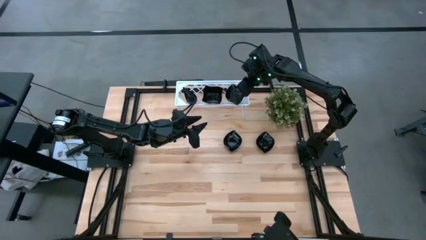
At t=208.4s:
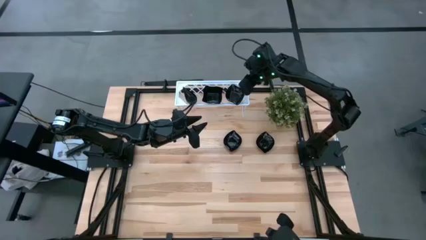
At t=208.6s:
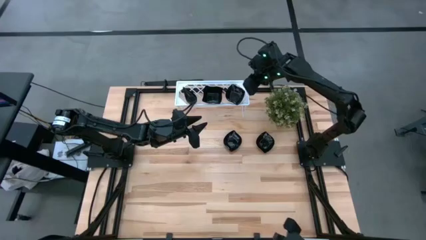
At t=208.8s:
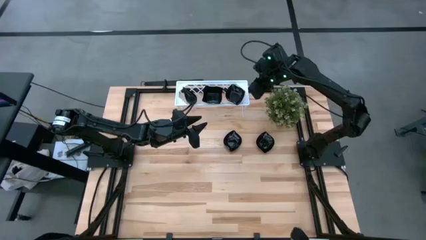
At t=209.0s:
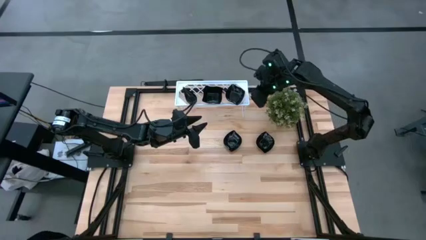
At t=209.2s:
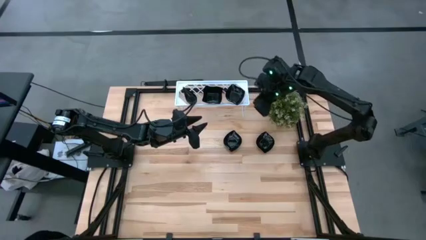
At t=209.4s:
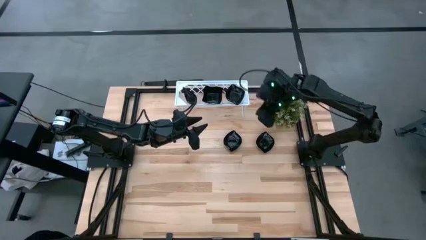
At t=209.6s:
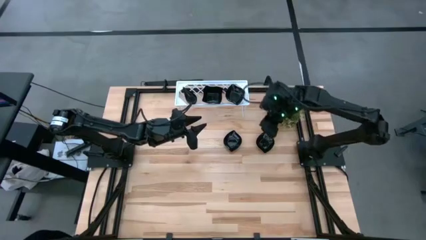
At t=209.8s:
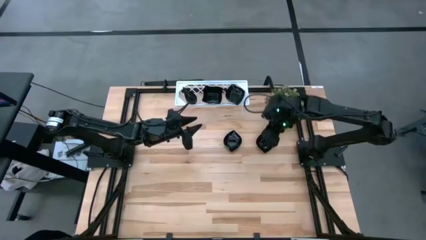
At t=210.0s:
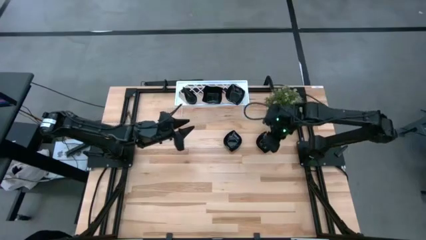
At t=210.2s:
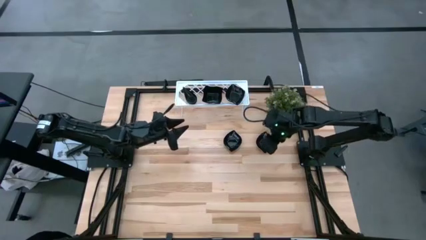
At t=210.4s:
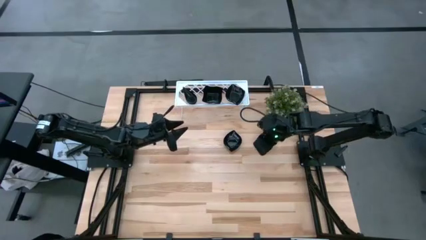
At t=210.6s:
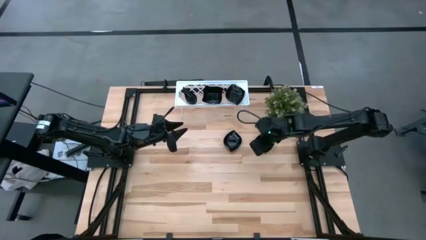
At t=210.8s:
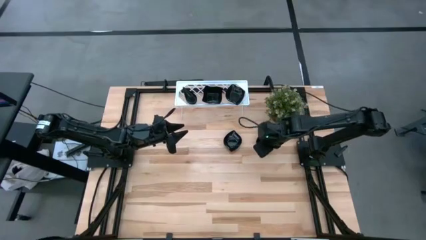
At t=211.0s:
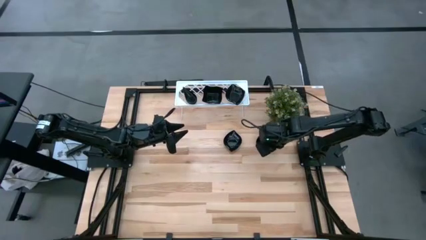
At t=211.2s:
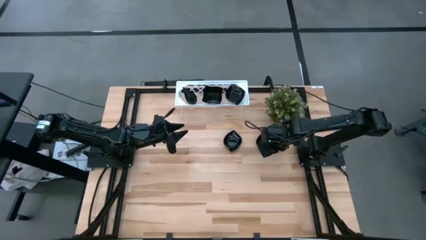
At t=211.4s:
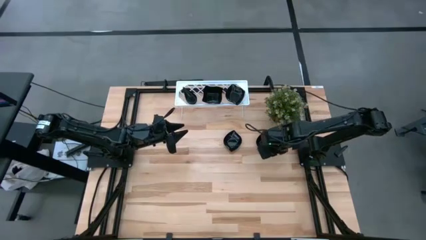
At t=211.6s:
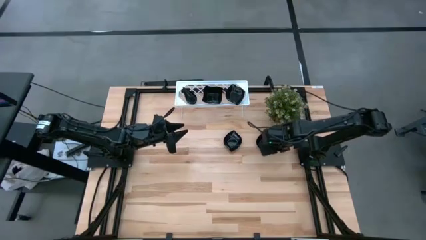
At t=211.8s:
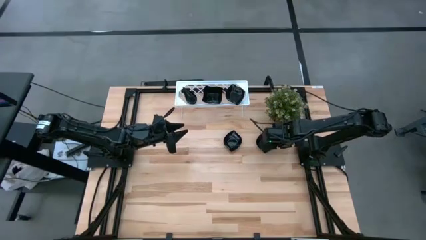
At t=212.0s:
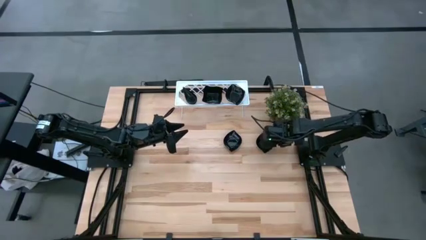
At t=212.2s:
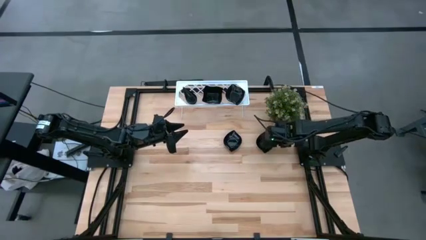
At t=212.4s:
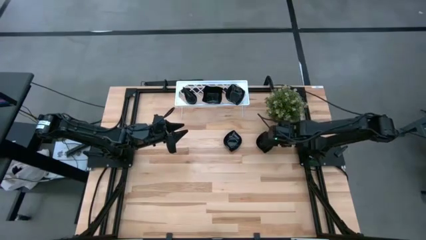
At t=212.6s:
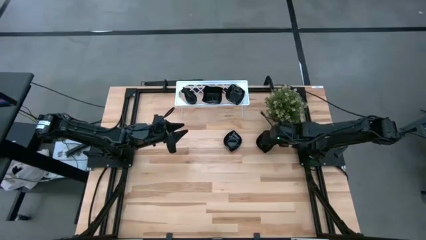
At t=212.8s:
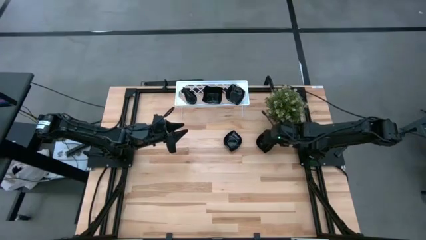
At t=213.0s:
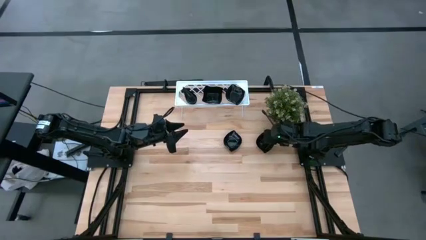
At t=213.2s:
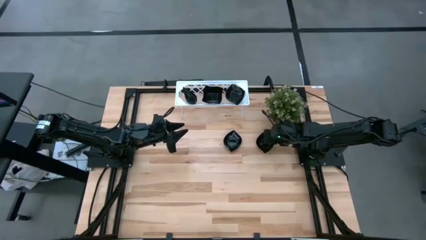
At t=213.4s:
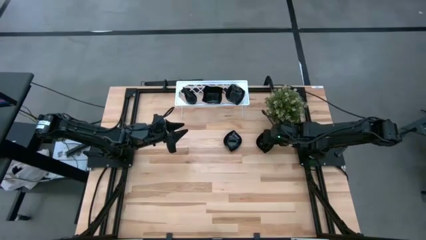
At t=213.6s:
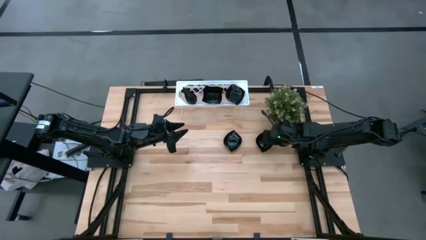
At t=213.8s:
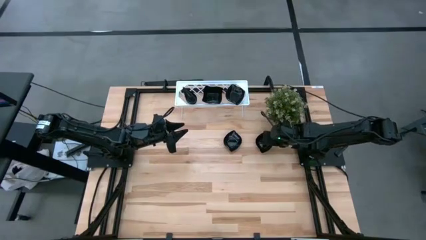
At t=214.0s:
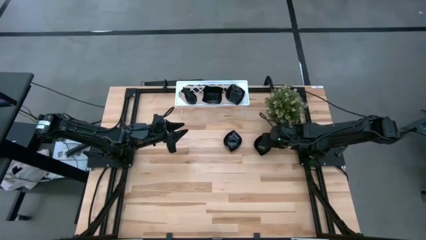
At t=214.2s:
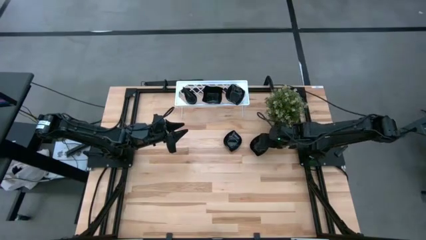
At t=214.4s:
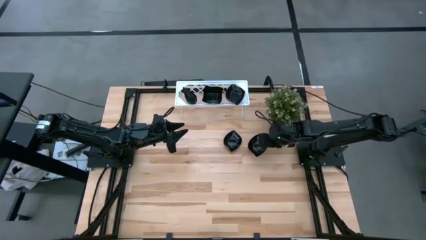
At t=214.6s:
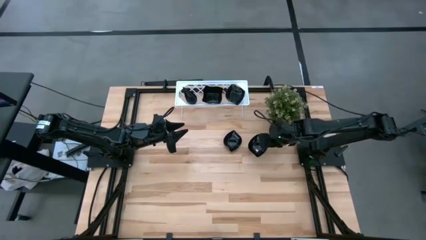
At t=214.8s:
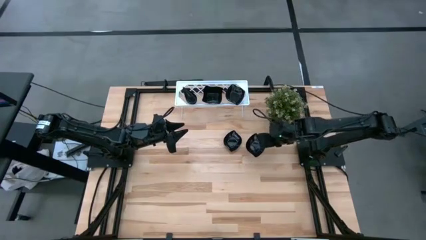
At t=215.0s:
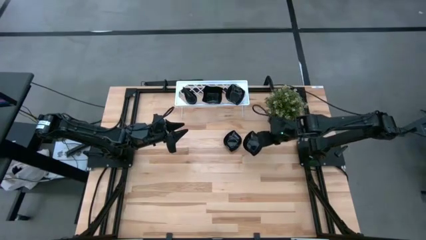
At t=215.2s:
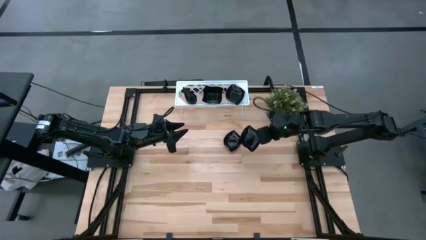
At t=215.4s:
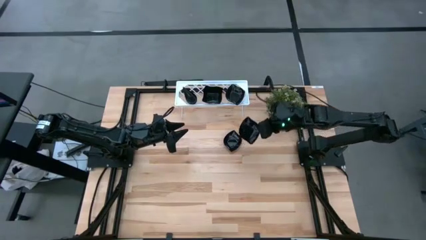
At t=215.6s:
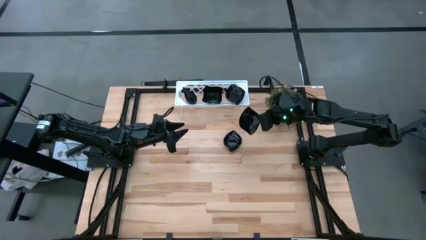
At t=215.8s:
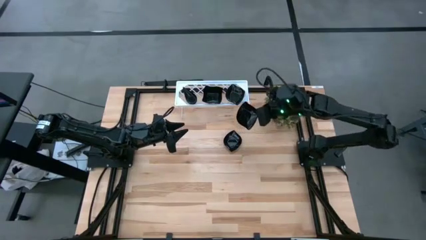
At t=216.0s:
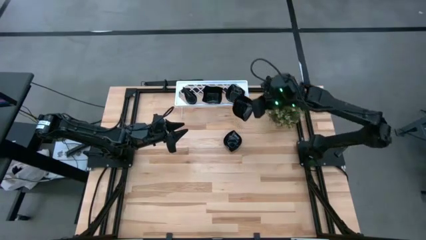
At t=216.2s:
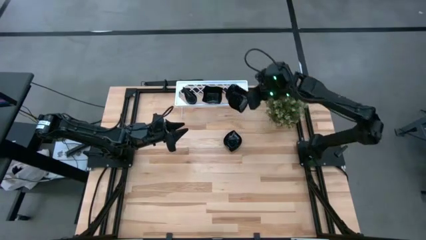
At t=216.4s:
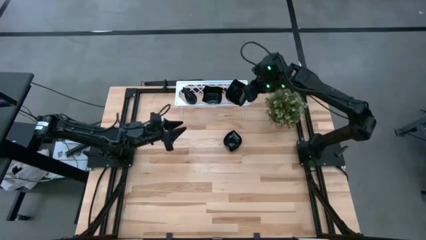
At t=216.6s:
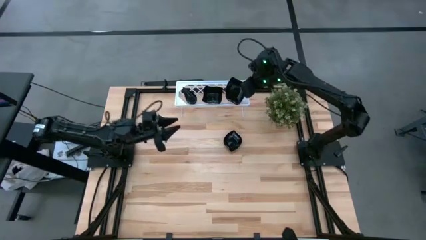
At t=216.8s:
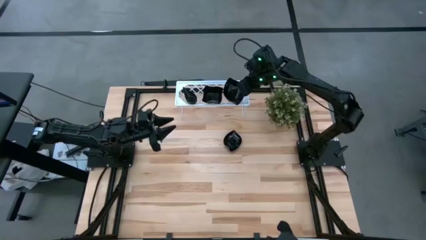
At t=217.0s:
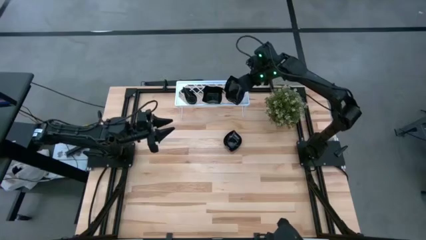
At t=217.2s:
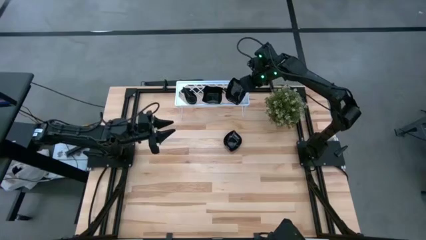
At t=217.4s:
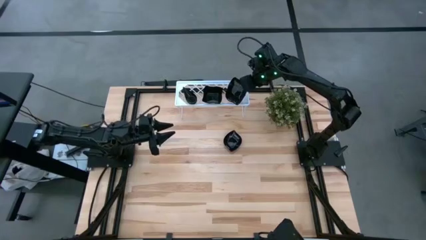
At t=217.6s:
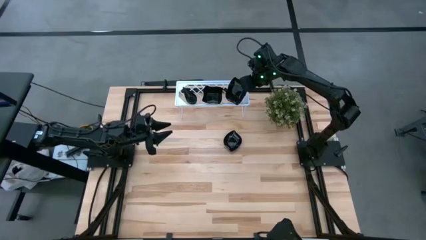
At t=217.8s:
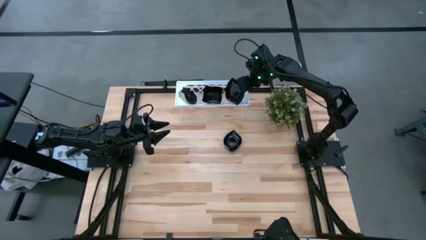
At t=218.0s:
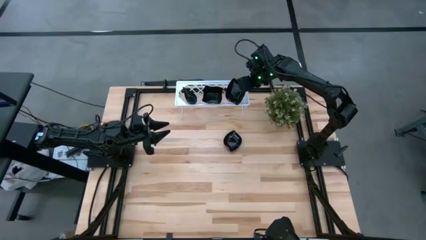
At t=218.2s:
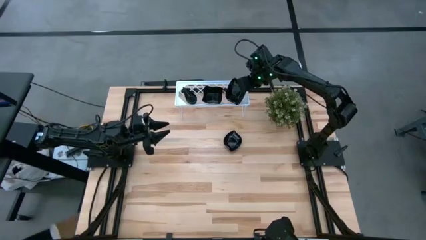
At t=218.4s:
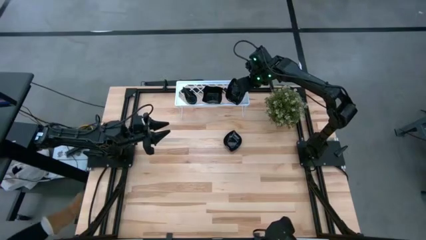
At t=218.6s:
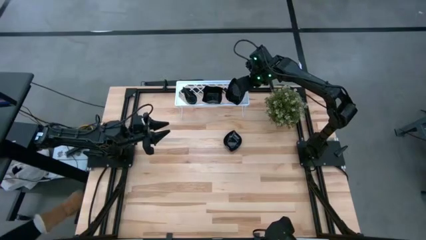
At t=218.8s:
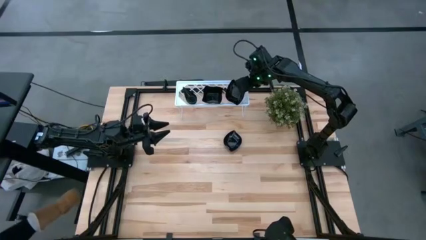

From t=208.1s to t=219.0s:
Task: Pick & Place Mini shaped plates
Stack the right leaf shaped plate on top of the leaf shaped plates on the shelf

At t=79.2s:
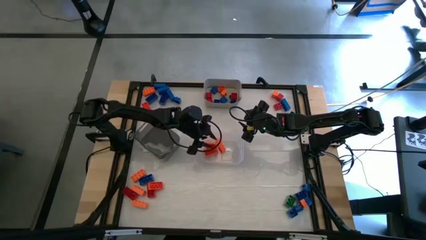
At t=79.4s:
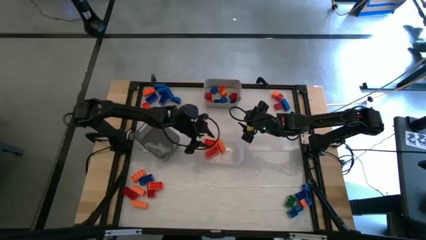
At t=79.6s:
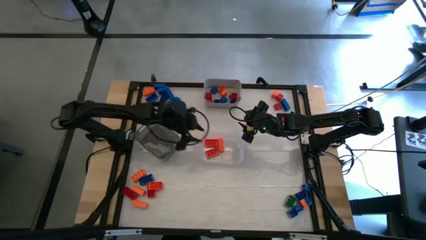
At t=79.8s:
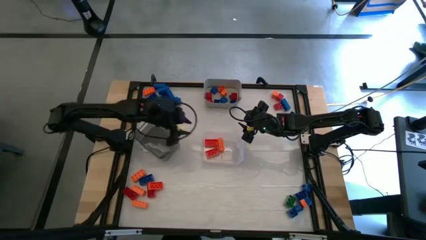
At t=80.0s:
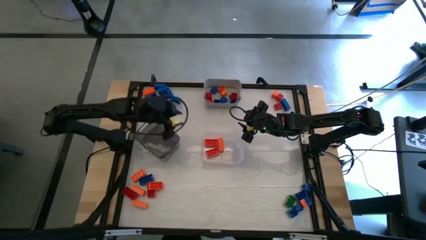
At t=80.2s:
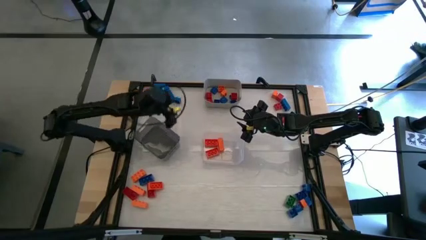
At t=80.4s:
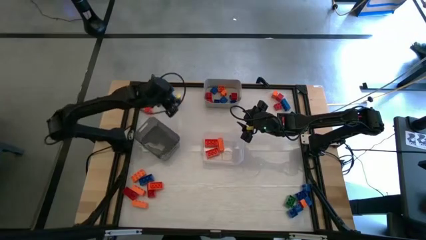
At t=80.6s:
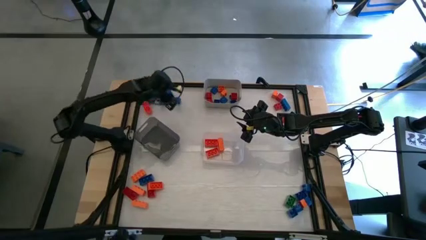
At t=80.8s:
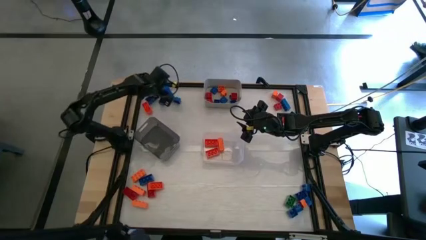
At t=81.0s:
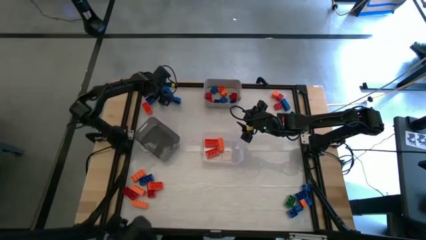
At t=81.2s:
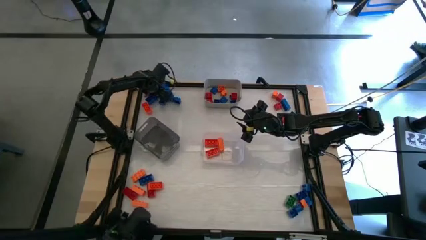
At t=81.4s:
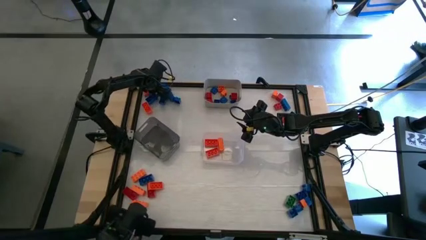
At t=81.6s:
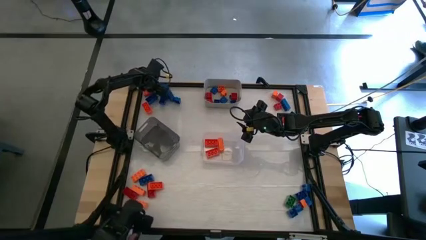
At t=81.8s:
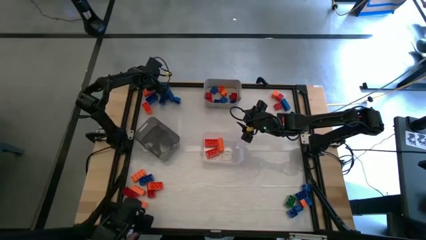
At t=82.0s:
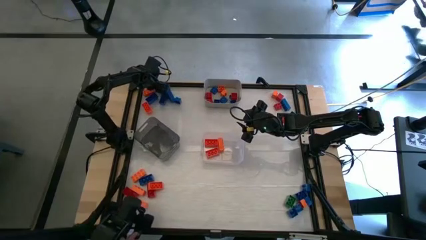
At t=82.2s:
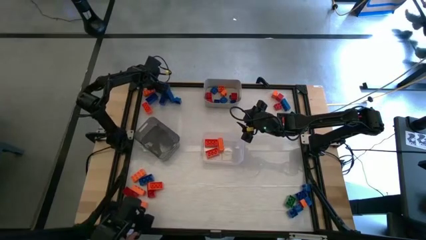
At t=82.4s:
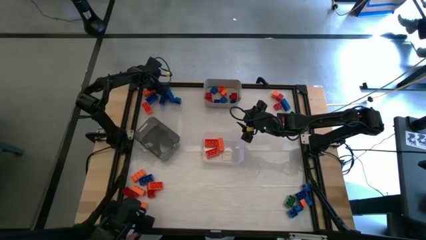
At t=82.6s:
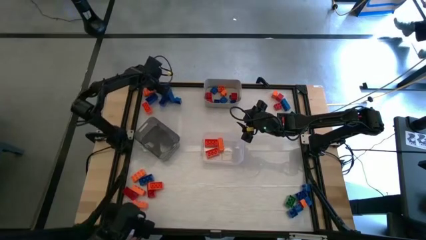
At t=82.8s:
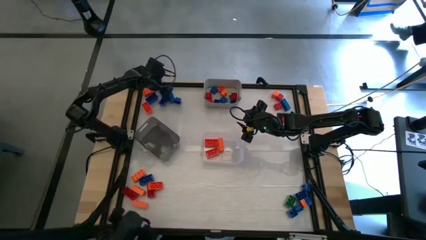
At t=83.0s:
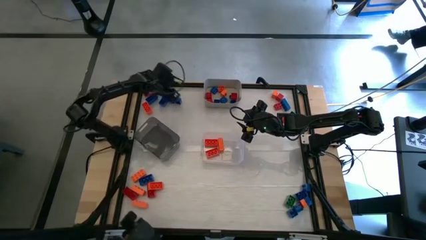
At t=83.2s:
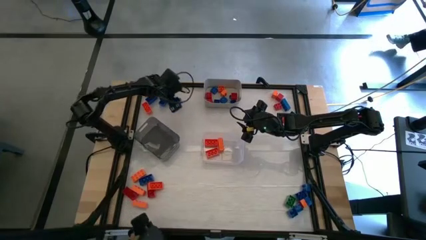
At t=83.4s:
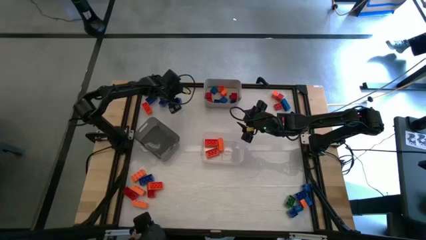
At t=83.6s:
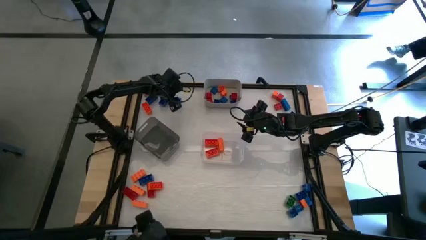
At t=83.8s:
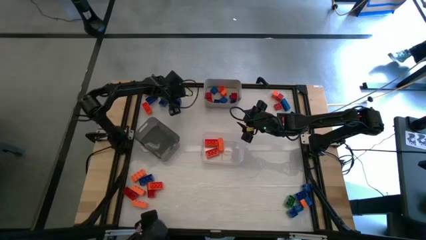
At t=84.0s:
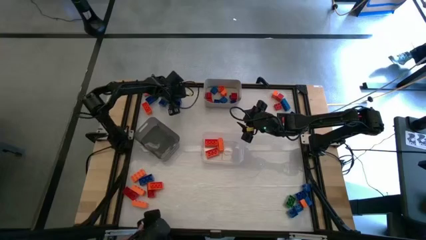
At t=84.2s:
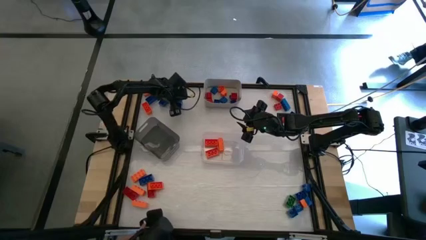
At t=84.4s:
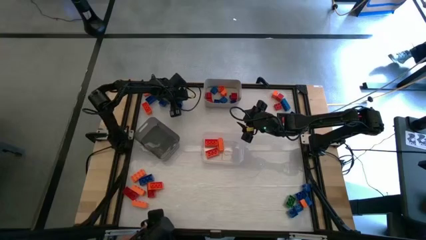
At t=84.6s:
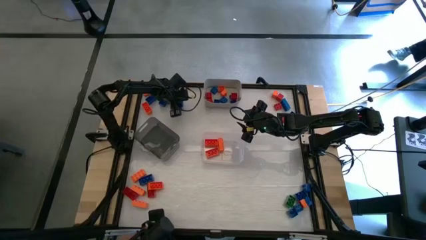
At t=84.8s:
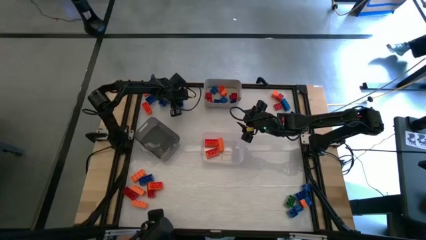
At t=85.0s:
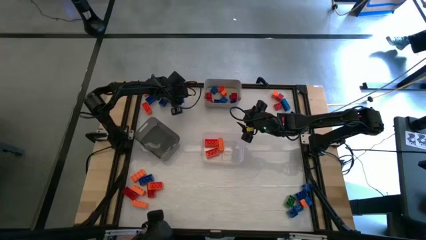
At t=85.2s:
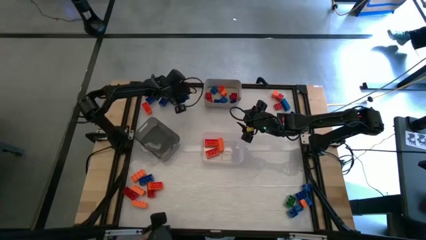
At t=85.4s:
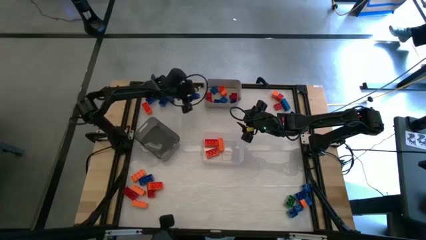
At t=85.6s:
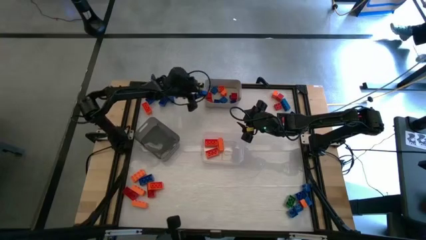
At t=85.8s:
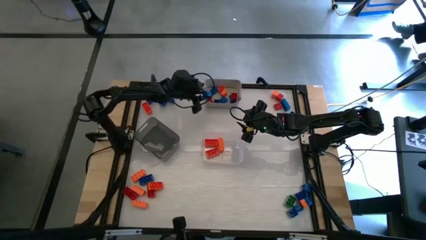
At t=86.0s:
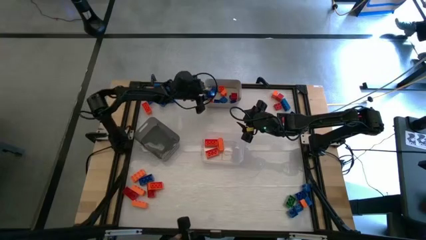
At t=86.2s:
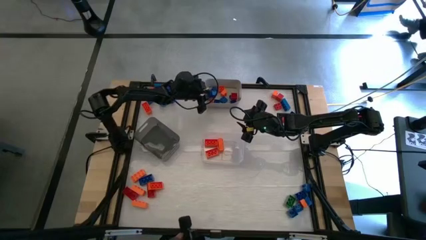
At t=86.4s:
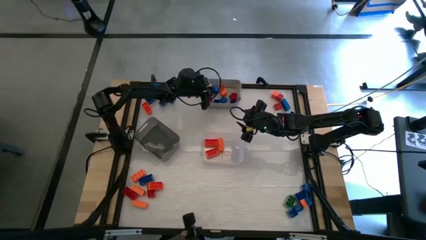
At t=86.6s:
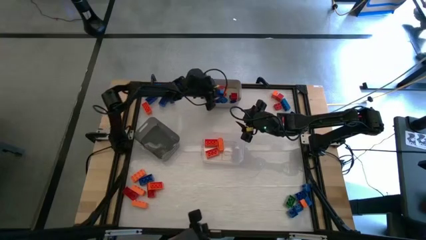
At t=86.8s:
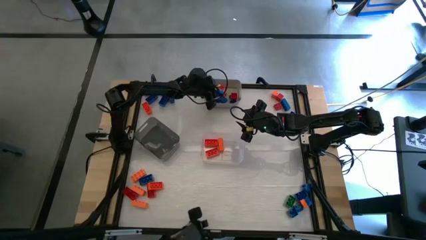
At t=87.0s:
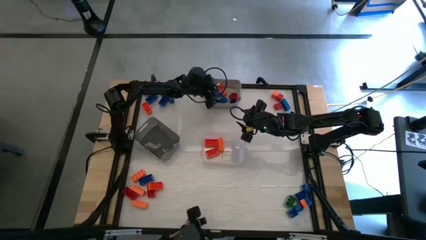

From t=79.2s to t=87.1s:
Task: Sort blocks by size
Put the small blue game piece into the gray bin
